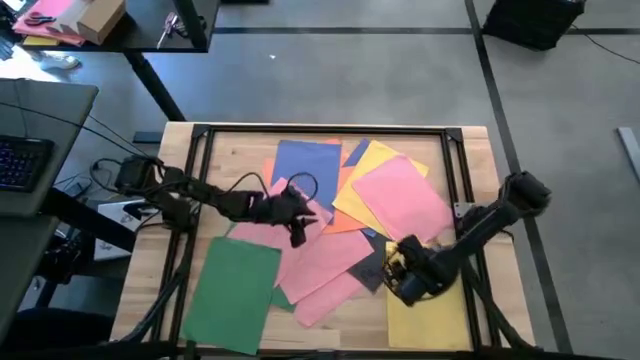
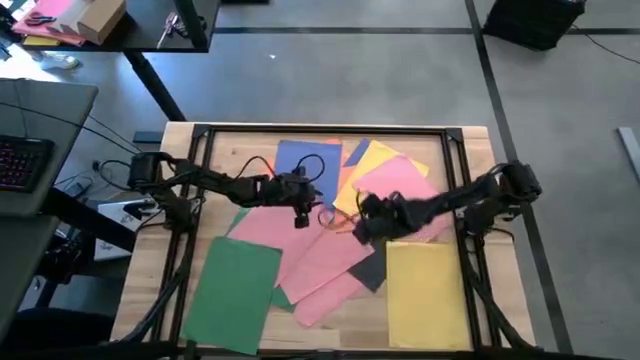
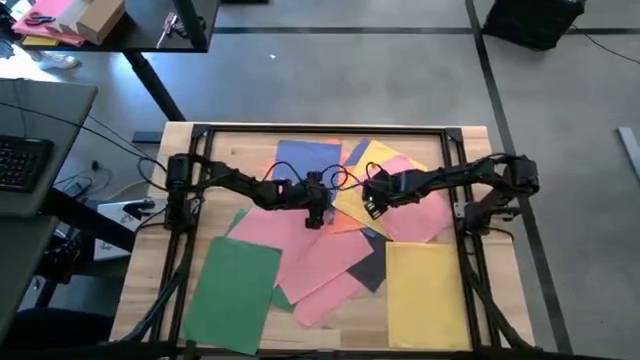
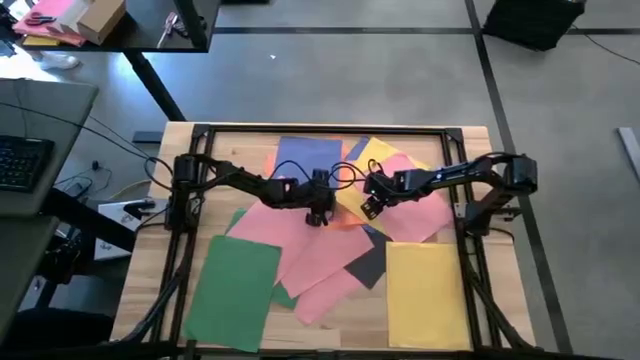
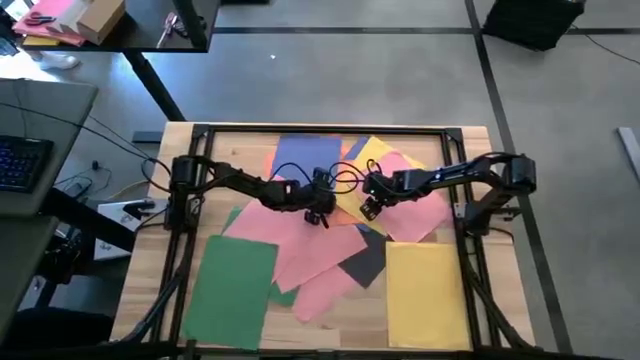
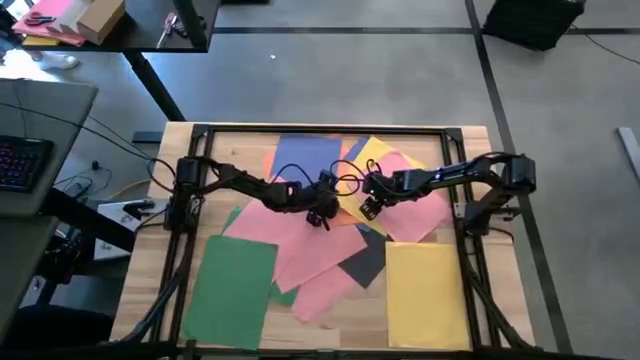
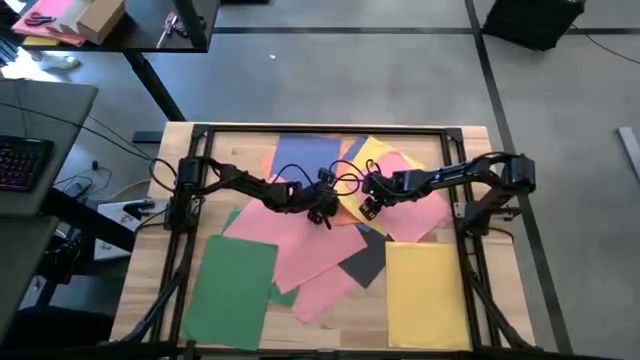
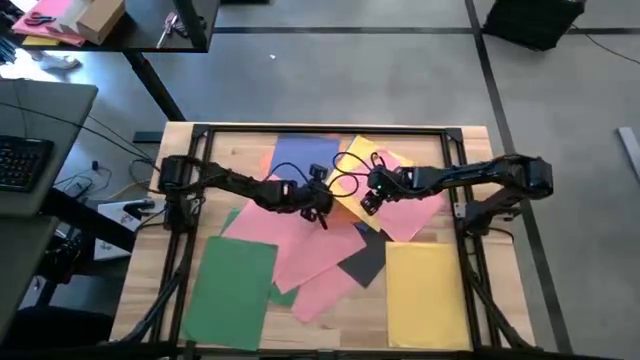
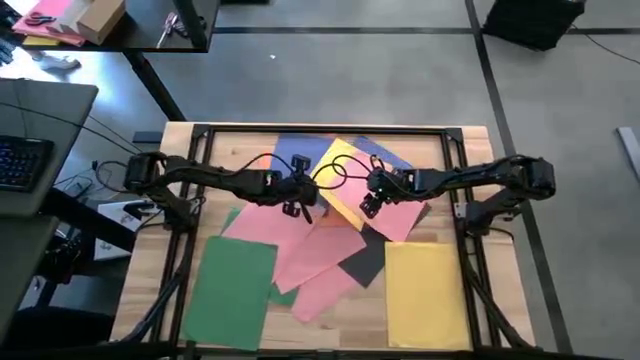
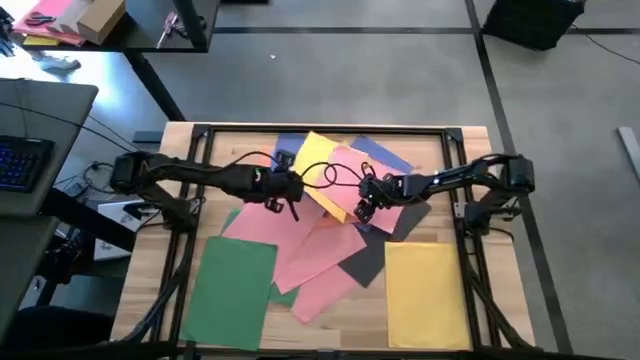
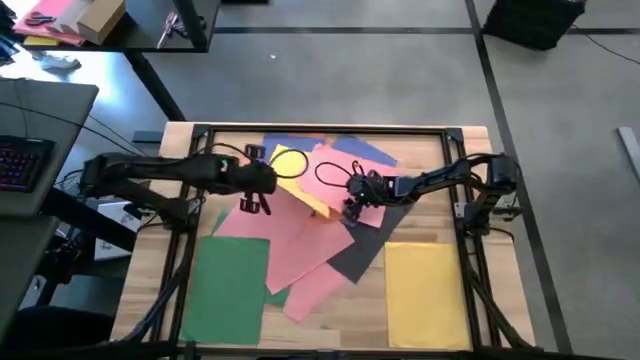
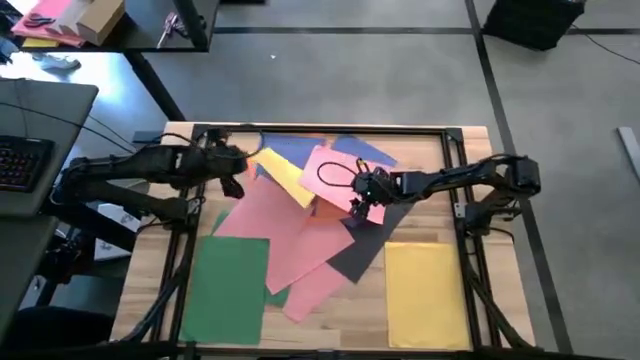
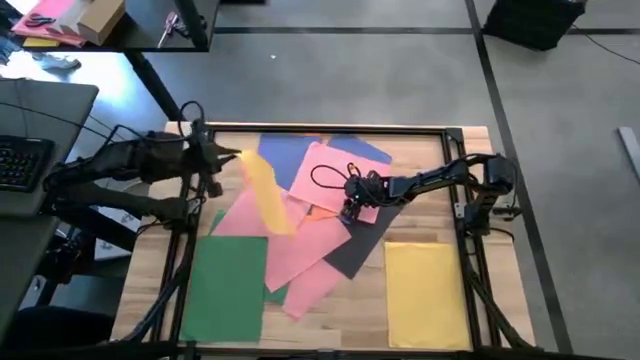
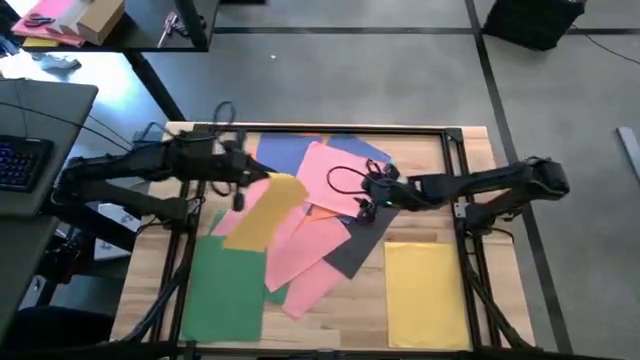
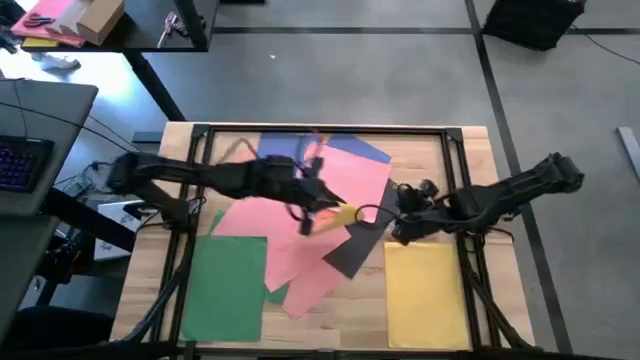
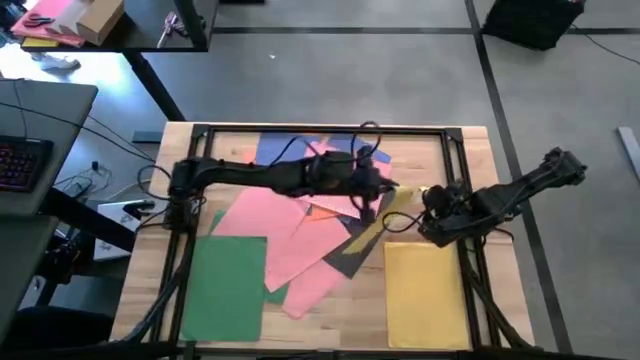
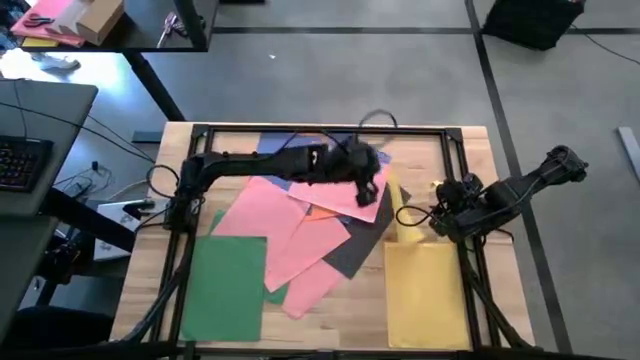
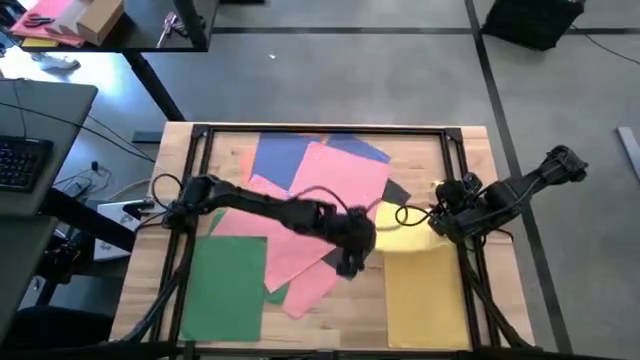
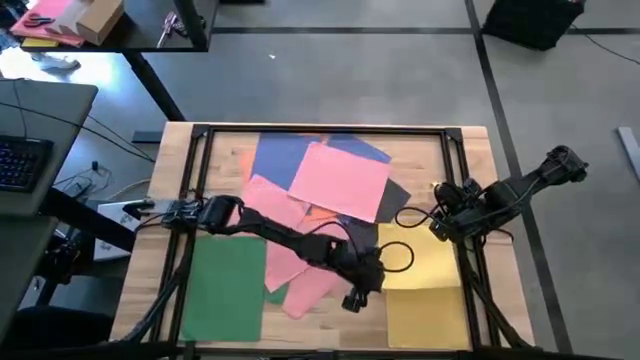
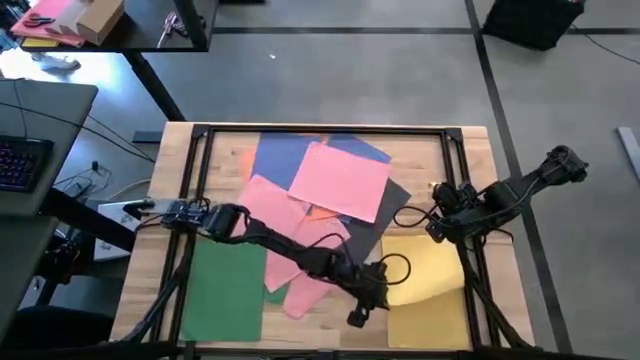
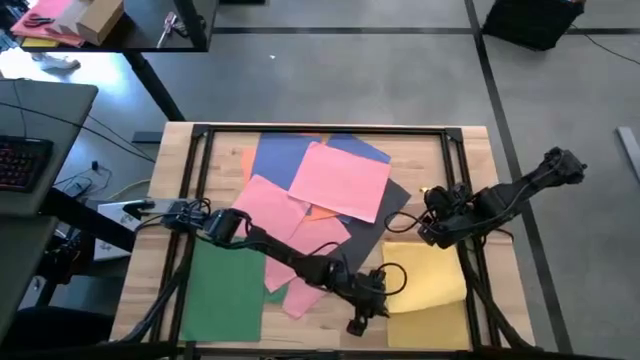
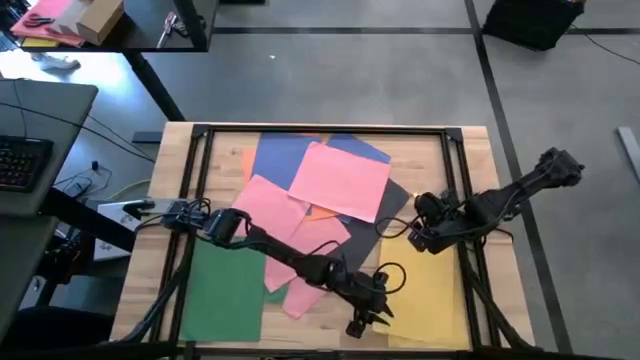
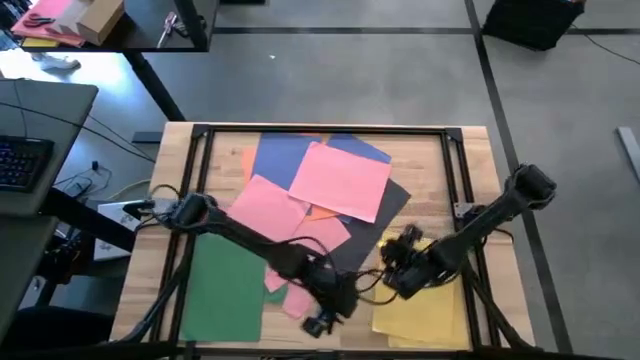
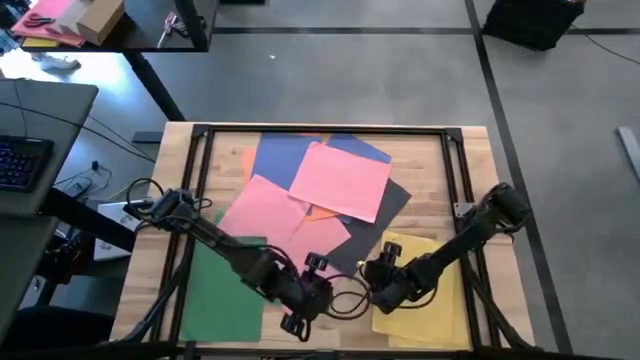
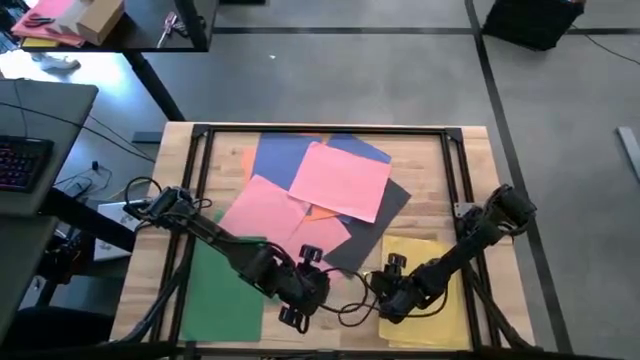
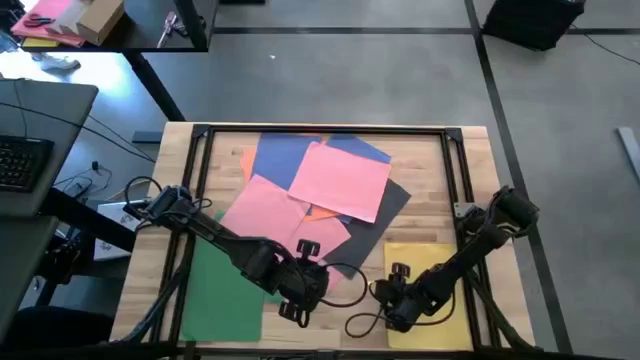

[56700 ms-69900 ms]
Task: Organize paper
Stack the yellow paper on top of the other yellow paper to the bottom right of the table

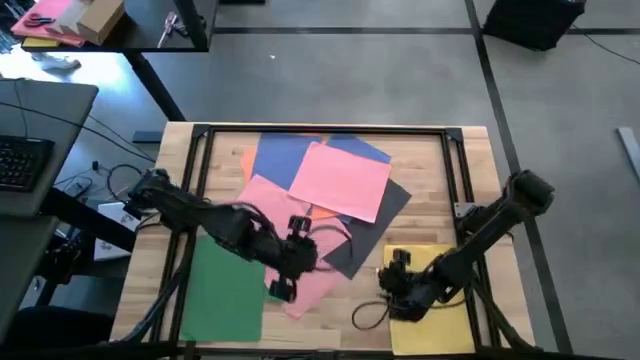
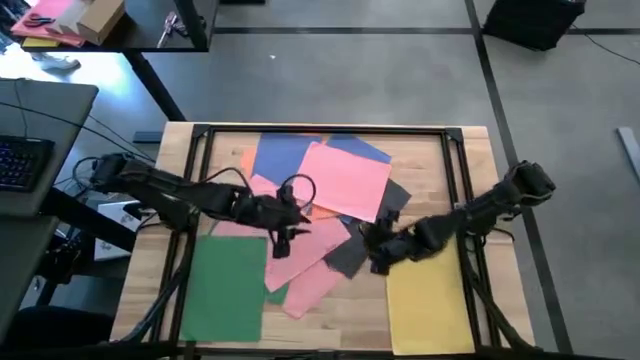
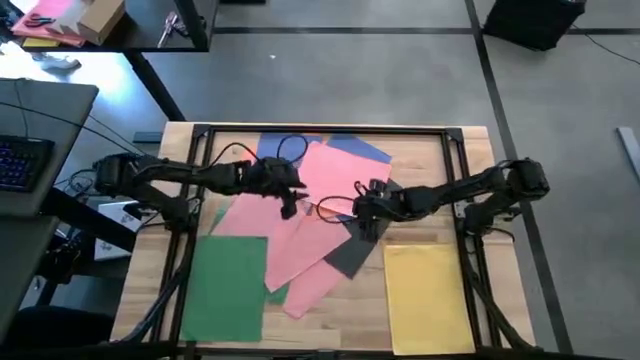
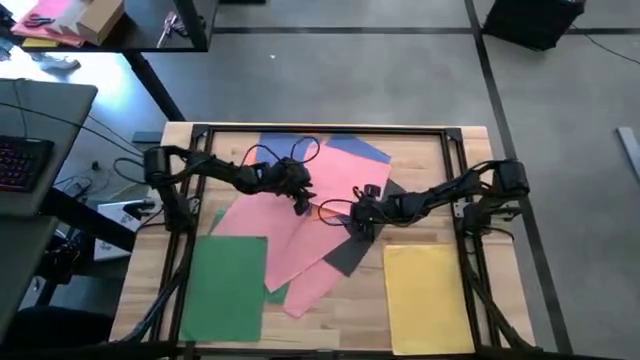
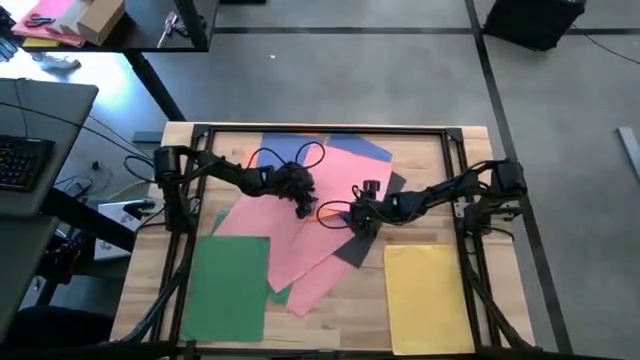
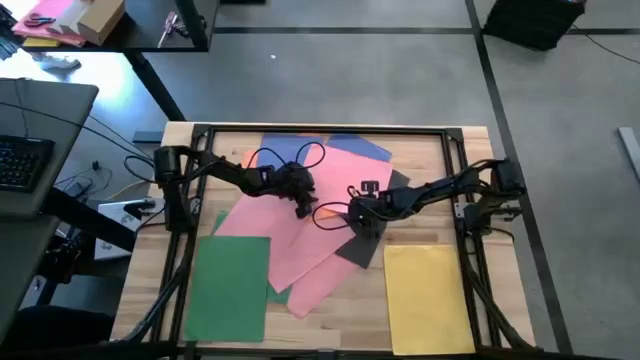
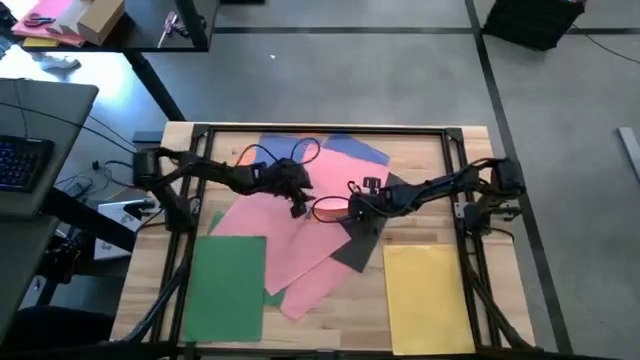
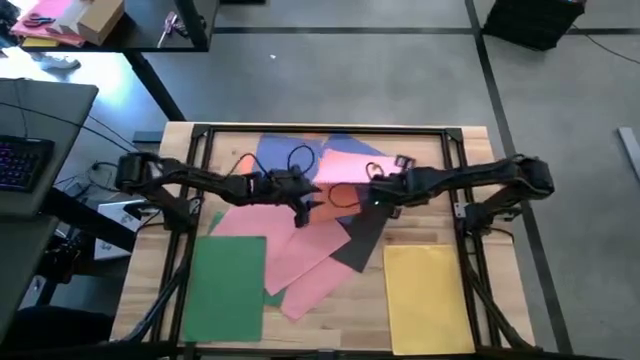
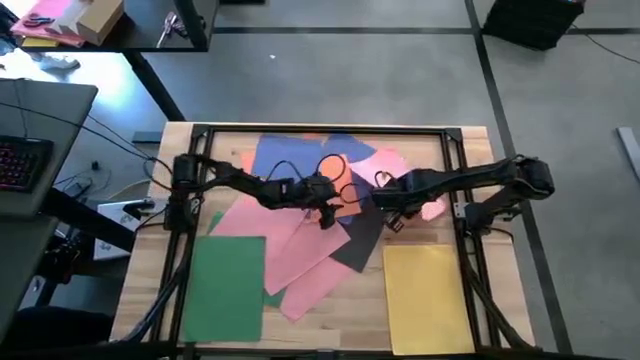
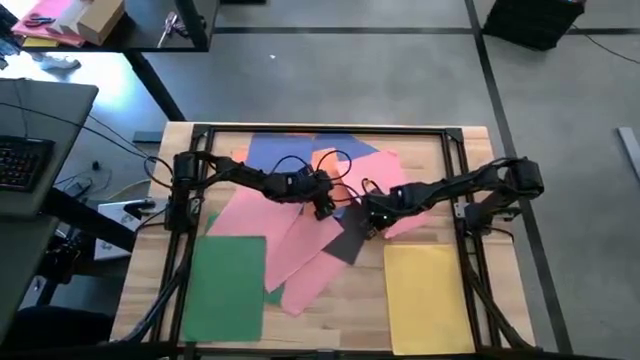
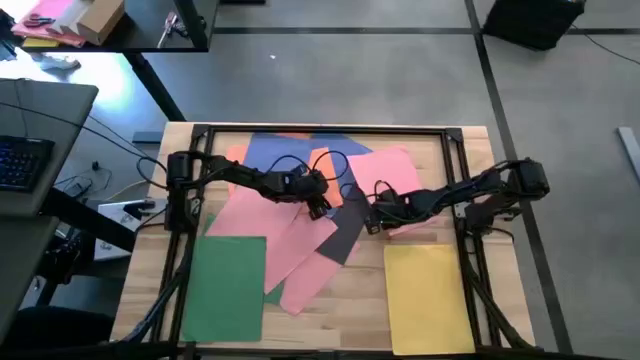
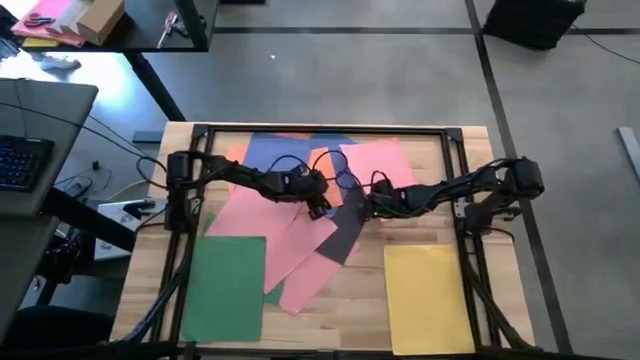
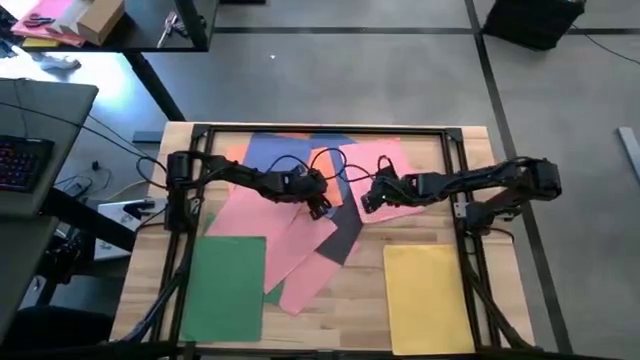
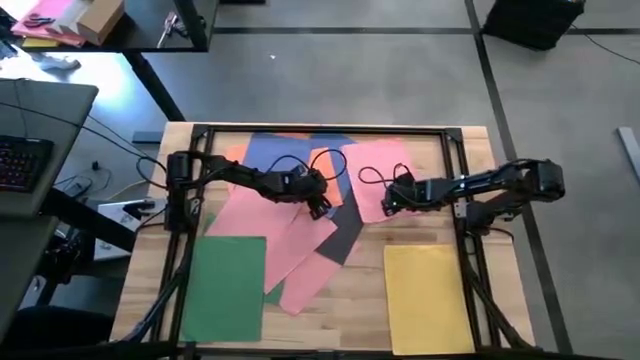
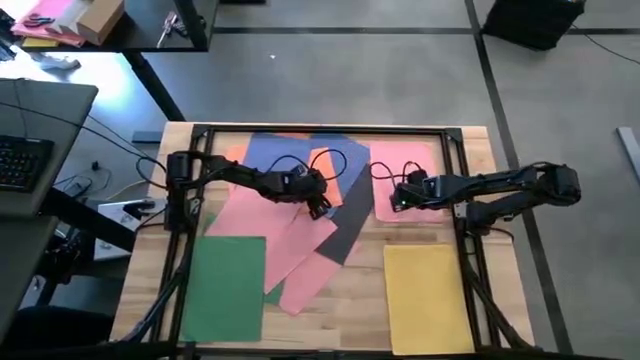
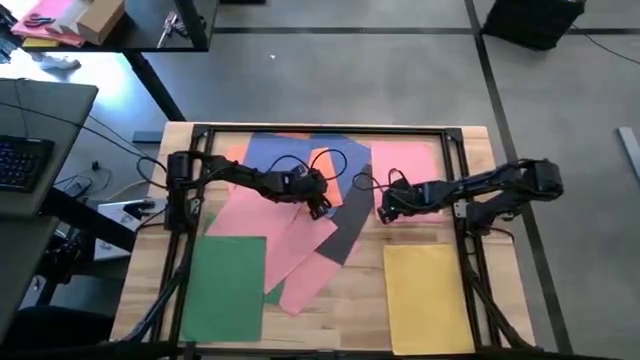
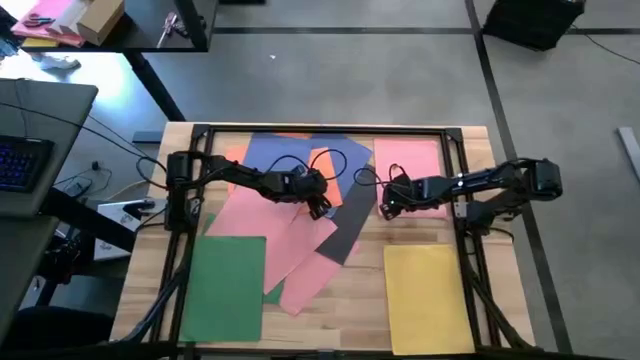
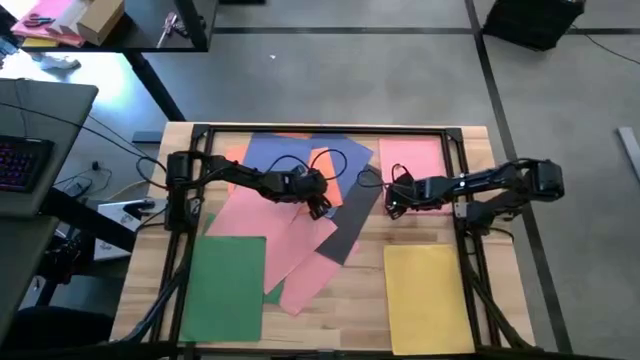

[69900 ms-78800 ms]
Move the pink paper to the top right of the table
